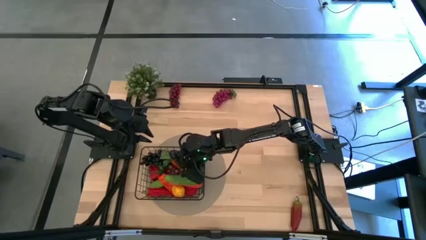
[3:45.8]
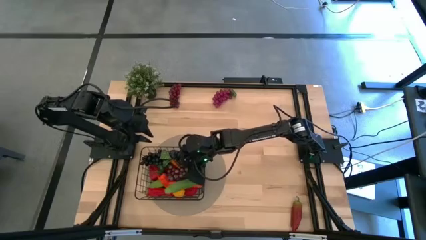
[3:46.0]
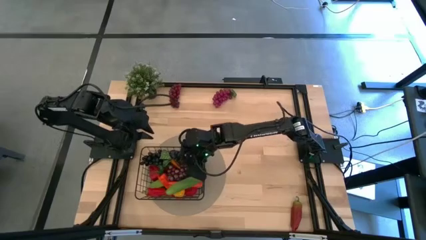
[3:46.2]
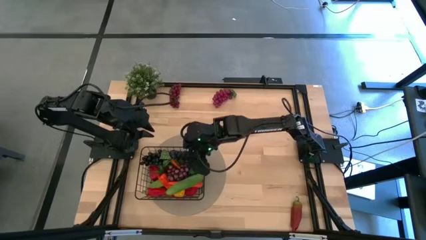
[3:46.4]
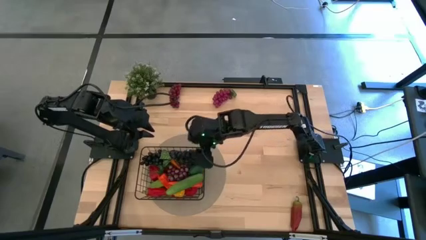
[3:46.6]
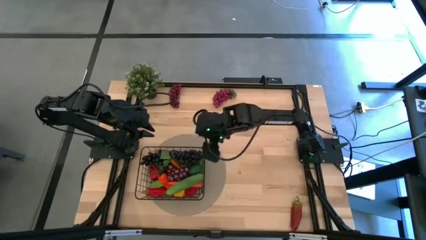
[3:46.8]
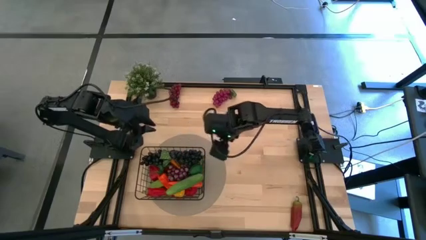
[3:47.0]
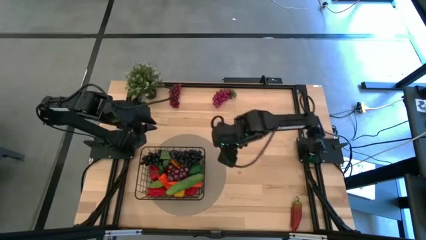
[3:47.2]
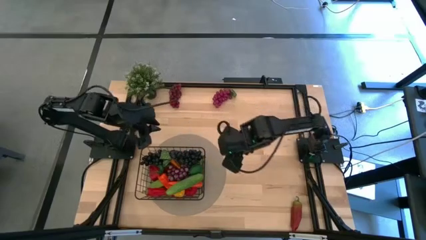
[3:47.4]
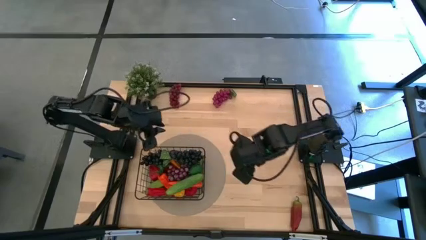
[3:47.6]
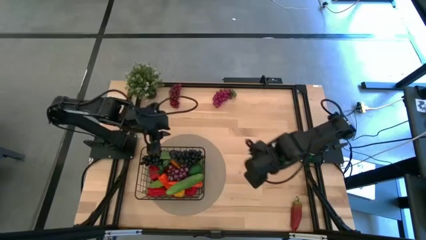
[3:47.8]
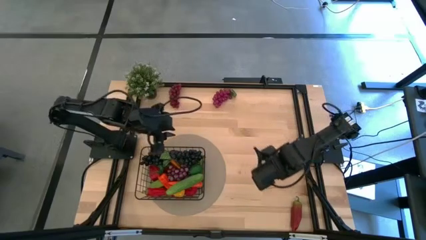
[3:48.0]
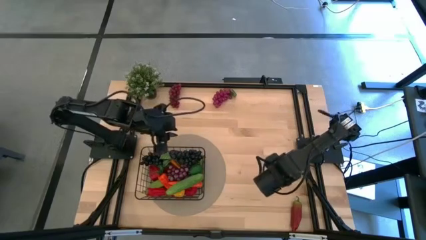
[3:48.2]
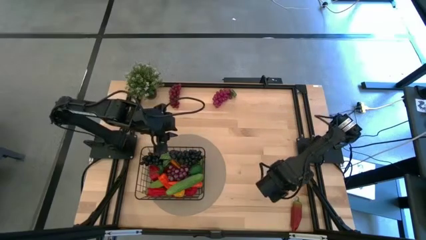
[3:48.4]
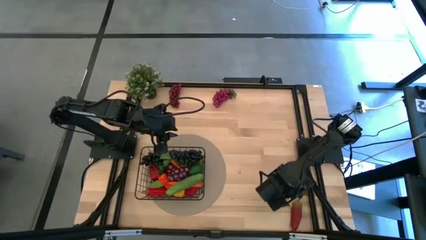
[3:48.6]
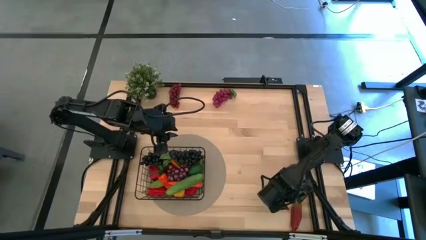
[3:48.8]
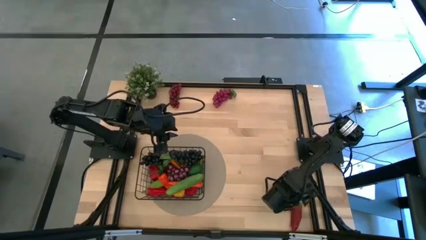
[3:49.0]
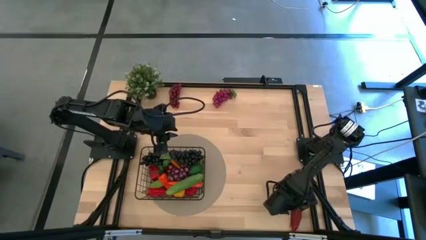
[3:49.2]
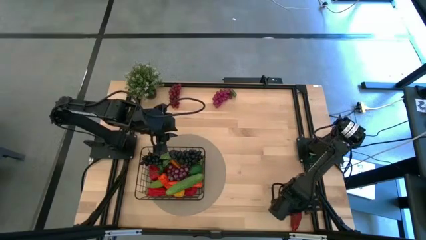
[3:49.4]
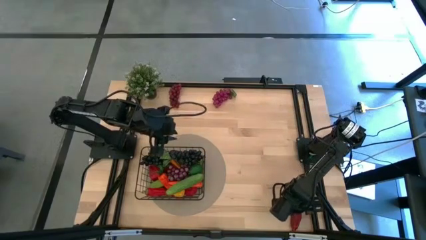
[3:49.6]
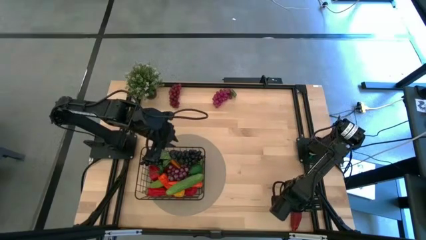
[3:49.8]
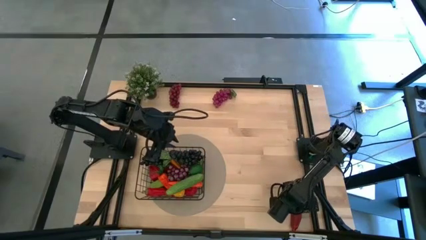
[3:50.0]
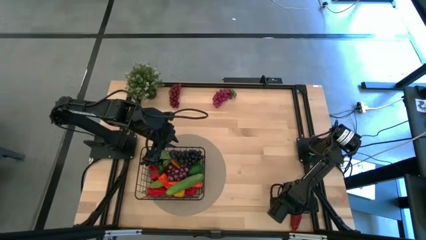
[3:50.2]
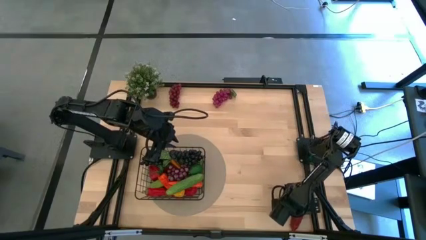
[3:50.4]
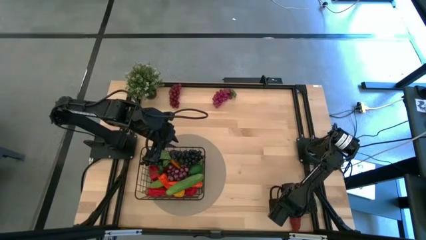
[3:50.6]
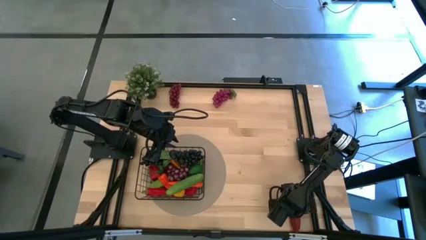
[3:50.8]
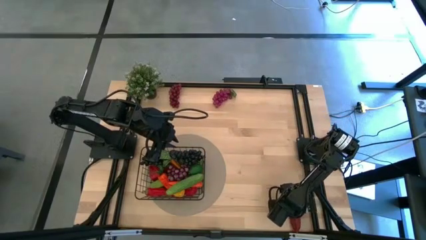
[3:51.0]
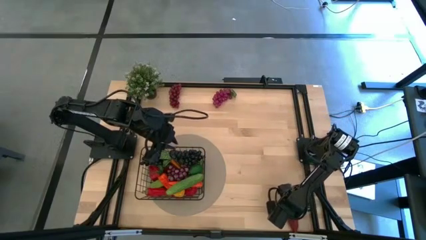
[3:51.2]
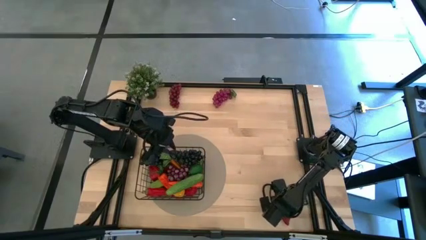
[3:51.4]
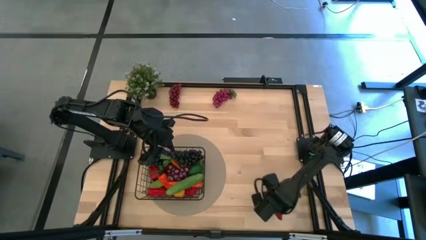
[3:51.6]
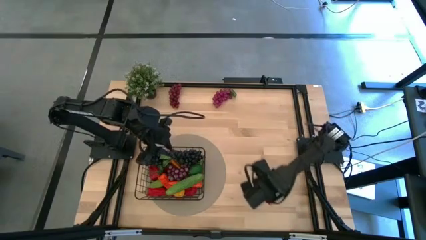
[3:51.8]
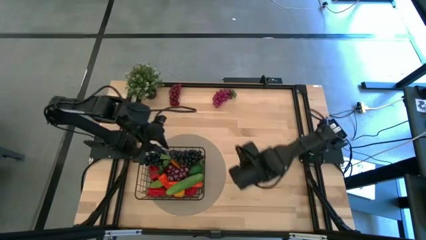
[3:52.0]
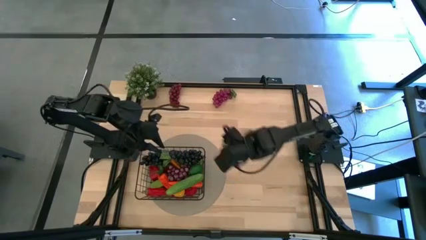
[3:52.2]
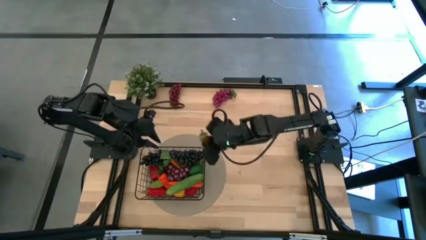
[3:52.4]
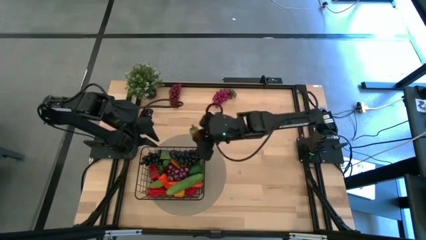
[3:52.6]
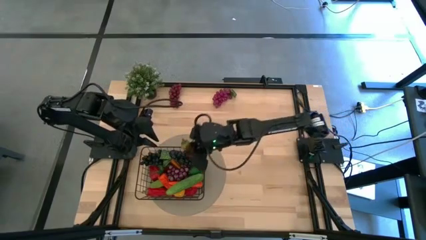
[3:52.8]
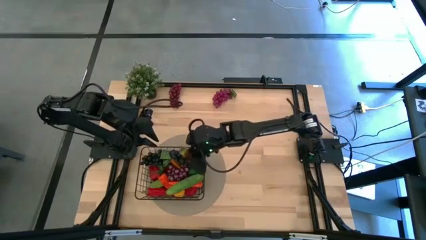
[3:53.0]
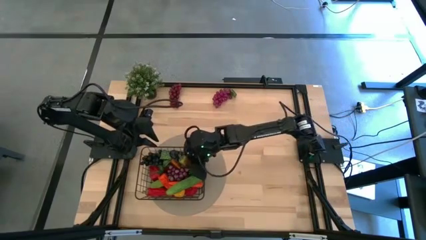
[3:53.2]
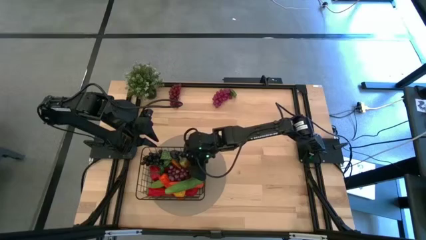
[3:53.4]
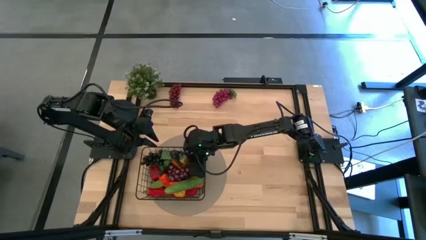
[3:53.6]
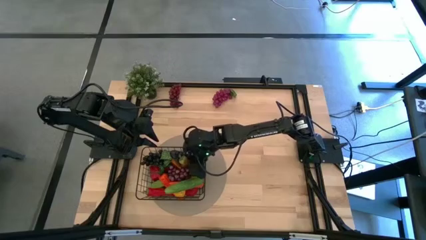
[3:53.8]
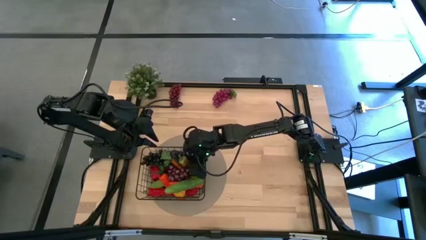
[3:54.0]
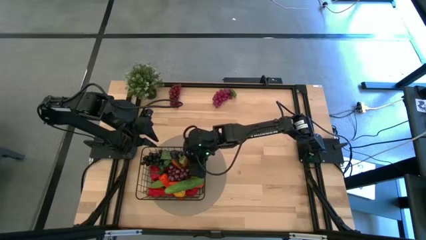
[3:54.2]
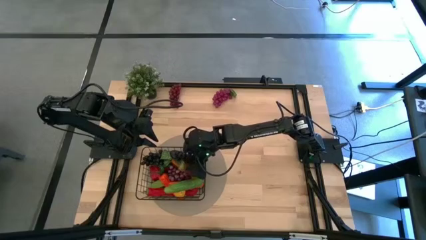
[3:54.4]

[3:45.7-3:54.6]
Task: Build produce basket
Put the dark red chili pepper into the black wire basket

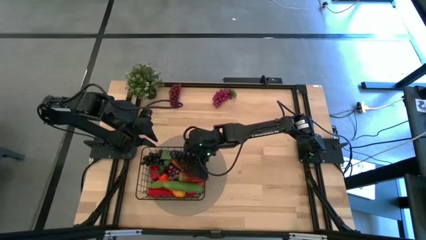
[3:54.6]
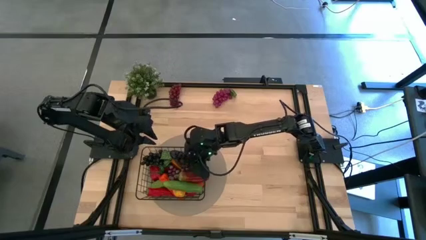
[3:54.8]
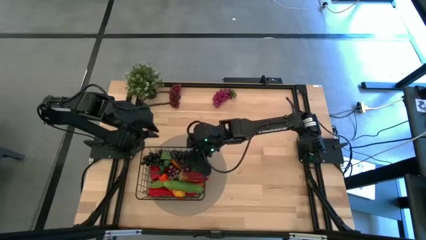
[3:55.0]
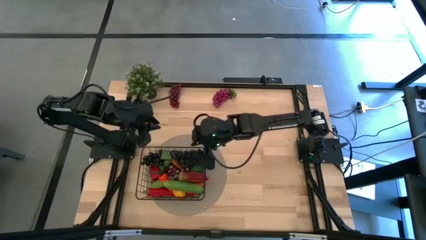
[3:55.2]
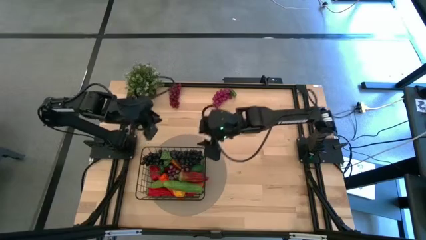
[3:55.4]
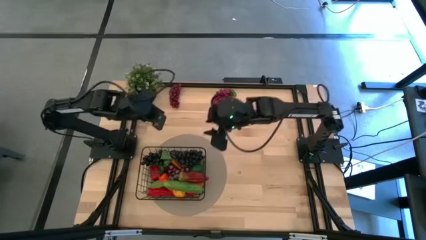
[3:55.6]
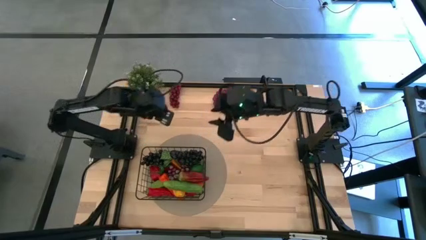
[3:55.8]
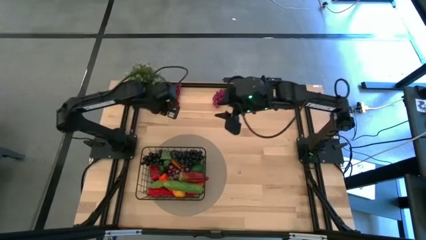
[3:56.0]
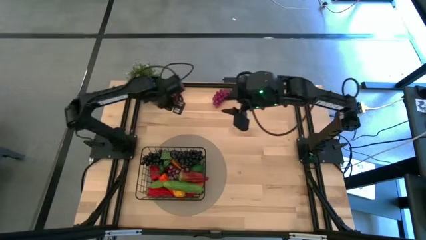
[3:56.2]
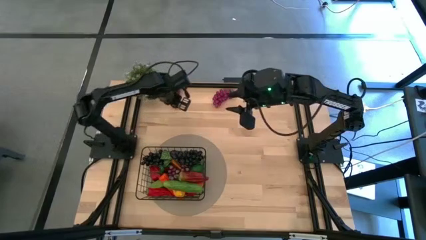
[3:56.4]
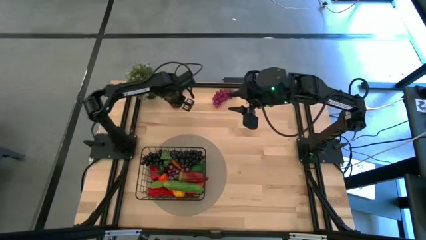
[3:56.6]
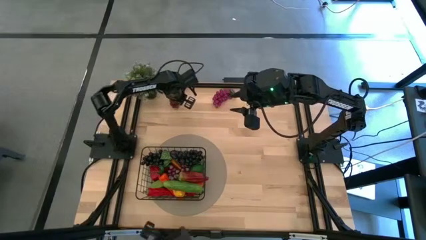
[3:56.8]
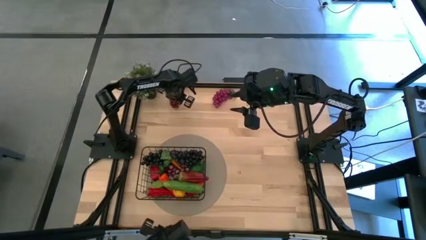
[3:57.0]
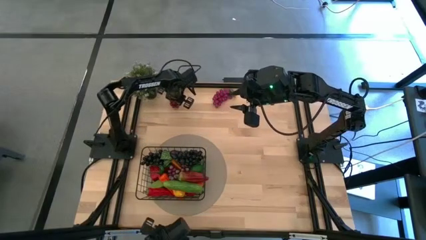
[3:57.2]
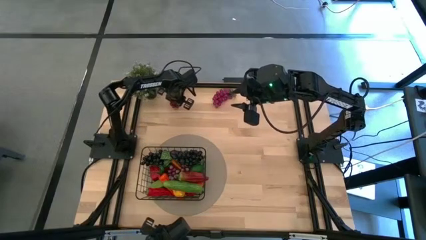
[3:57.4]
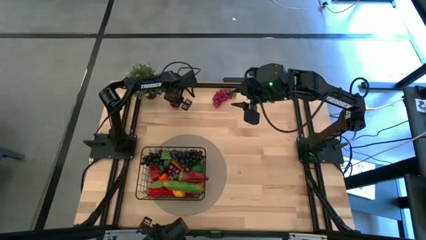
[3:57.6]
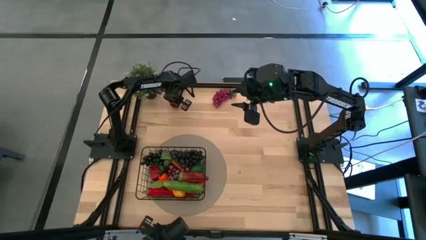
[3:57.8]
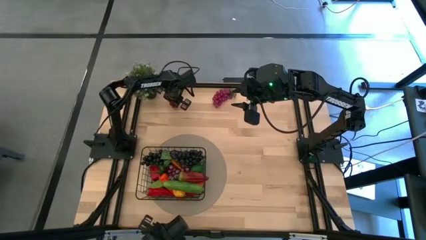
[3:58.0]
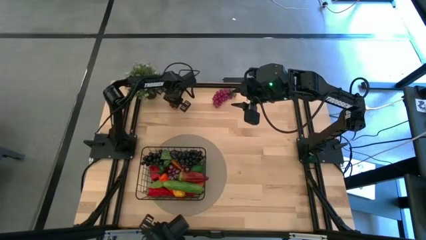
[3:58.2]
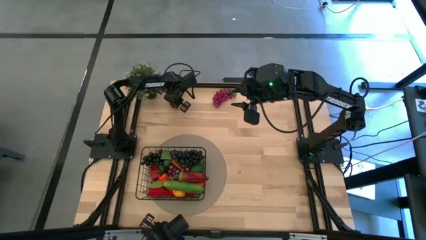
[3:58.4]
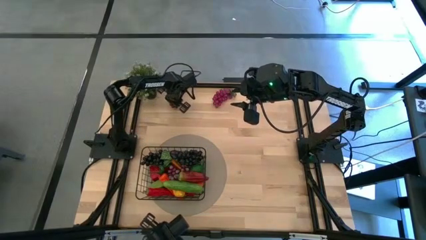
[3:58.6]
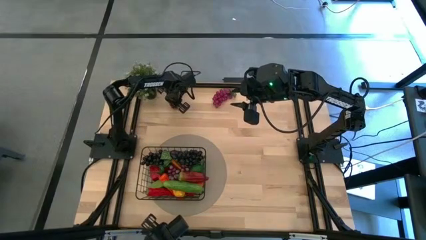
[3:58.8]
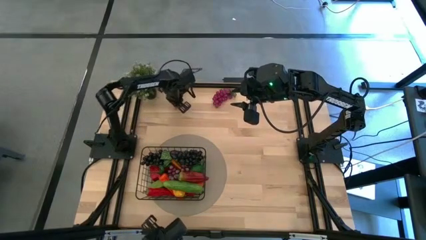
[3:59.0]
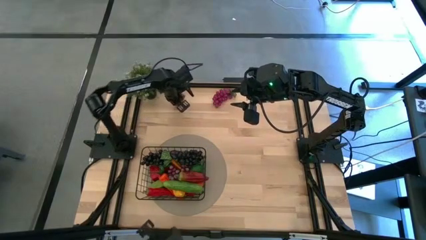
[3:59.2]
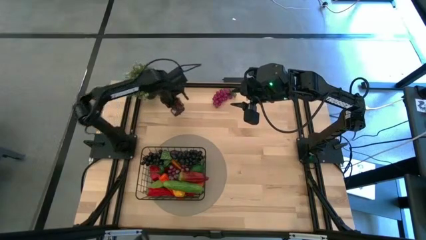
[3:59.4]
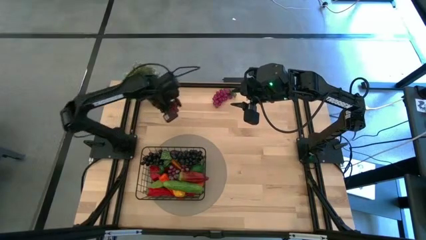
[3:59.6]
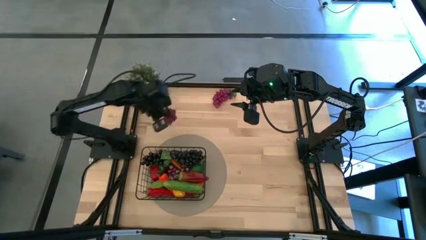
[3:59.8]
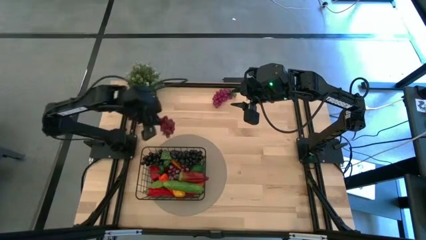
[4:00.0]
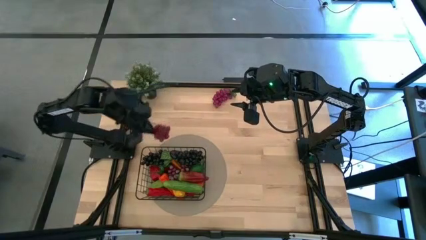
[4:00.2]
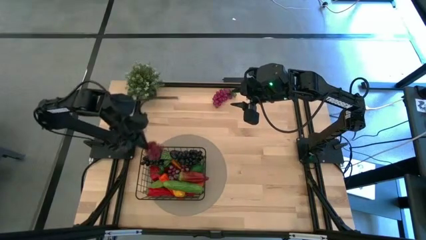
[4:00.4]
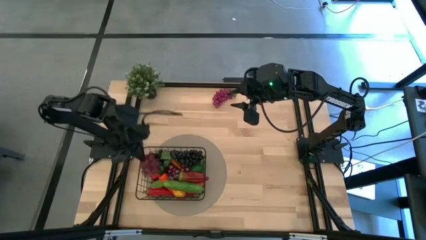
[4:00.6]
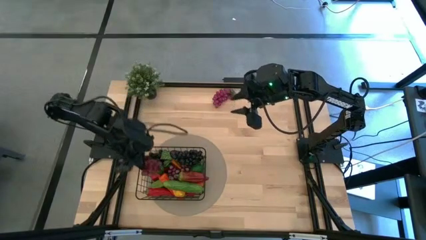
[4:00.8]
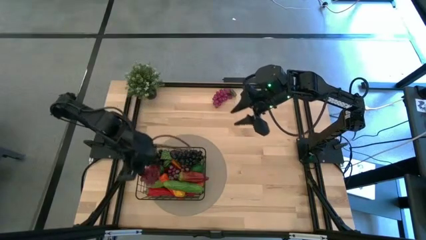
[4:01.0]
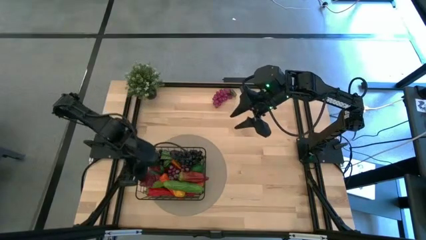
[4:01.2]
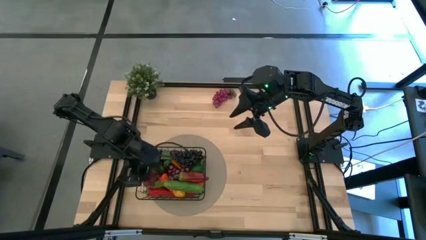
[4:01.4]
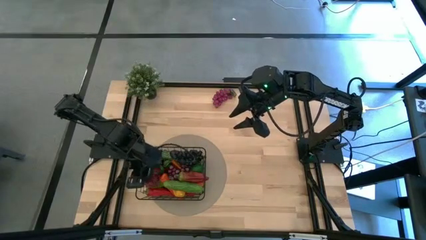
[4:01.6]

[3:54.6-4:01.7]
Put the left purple grapes into the black wire basket
